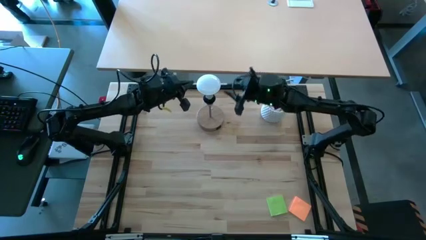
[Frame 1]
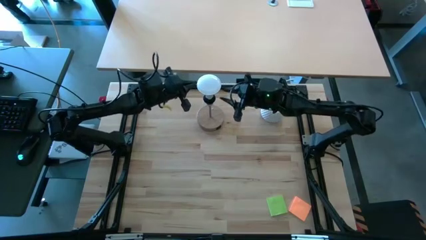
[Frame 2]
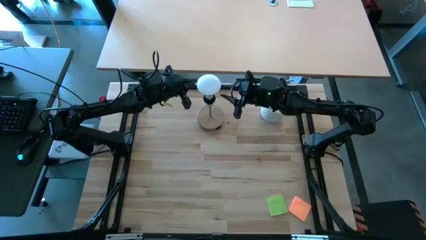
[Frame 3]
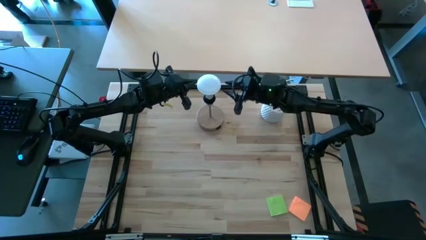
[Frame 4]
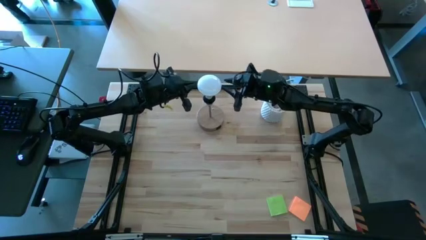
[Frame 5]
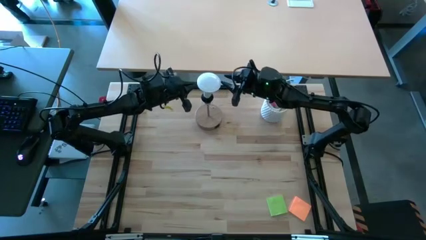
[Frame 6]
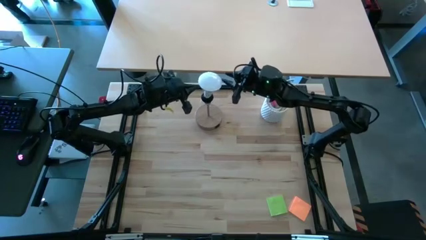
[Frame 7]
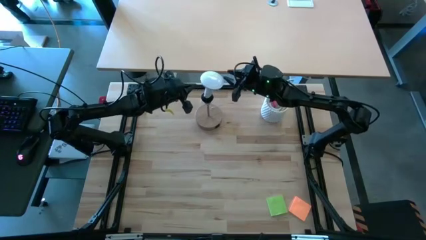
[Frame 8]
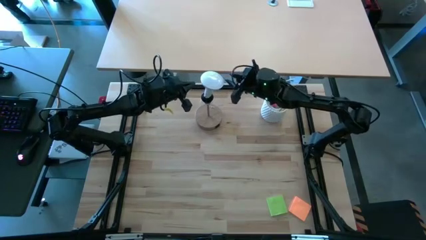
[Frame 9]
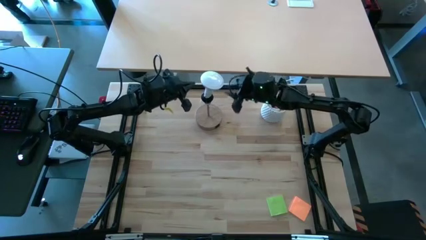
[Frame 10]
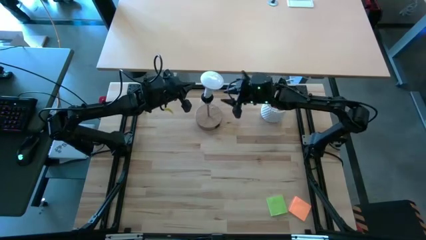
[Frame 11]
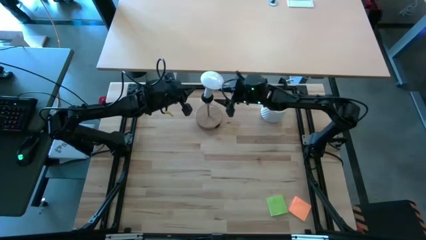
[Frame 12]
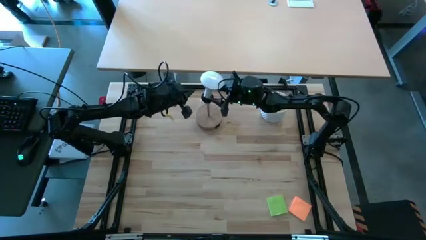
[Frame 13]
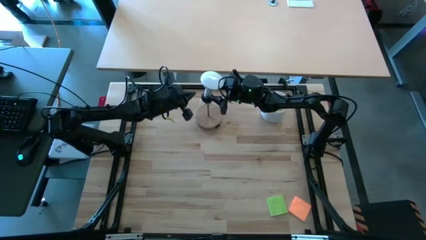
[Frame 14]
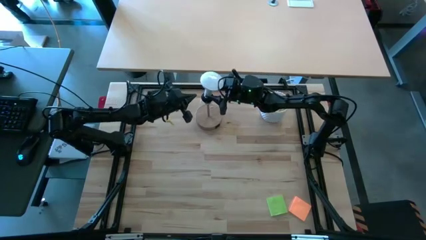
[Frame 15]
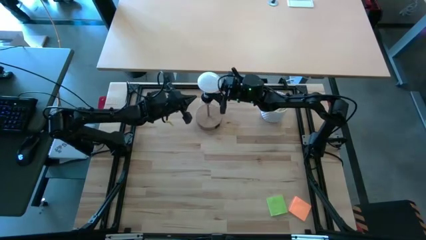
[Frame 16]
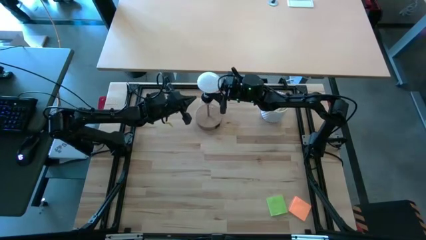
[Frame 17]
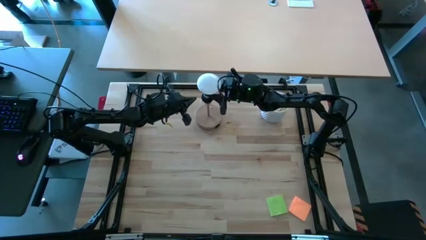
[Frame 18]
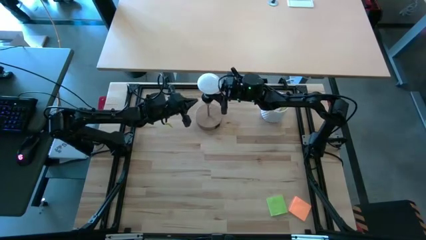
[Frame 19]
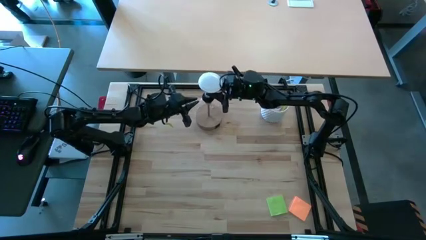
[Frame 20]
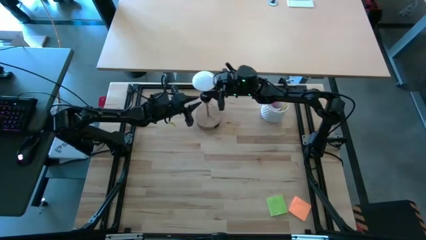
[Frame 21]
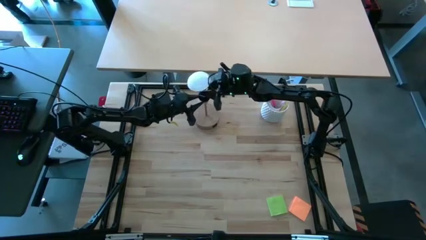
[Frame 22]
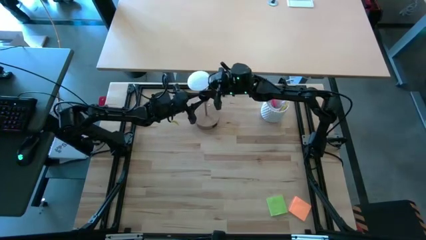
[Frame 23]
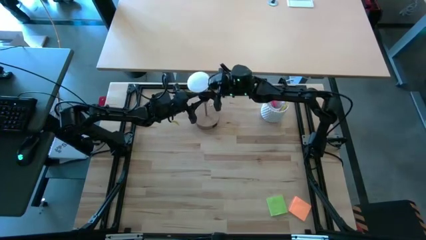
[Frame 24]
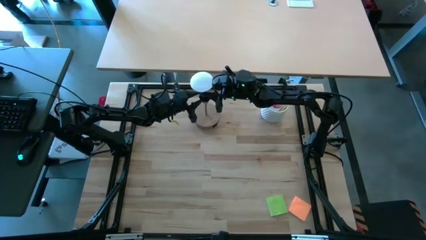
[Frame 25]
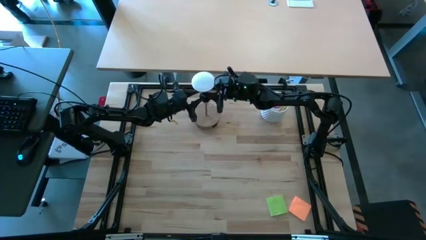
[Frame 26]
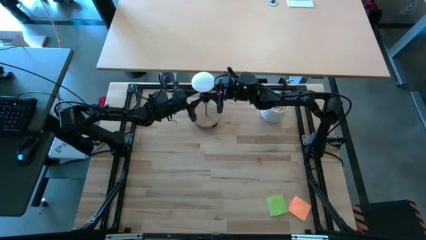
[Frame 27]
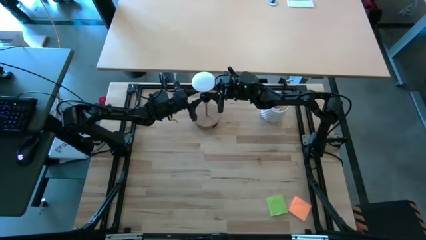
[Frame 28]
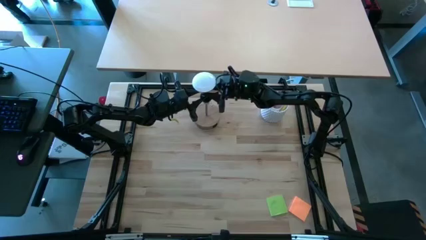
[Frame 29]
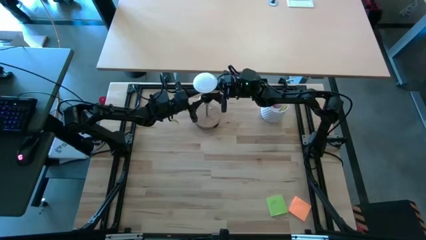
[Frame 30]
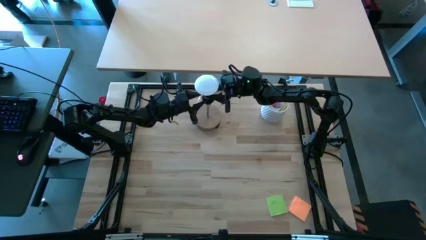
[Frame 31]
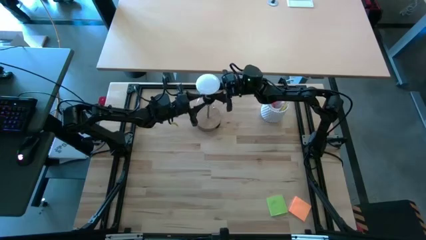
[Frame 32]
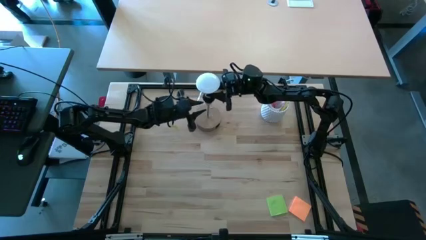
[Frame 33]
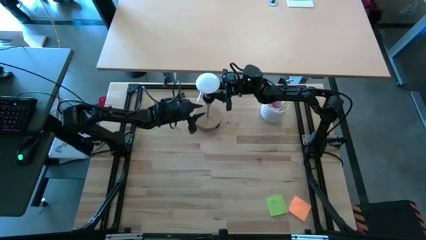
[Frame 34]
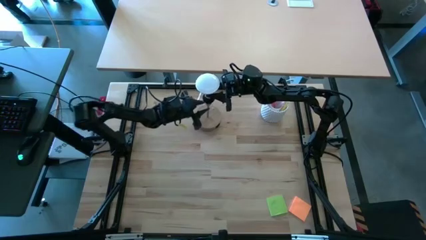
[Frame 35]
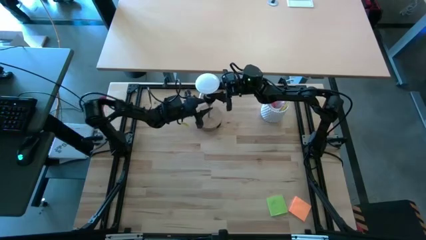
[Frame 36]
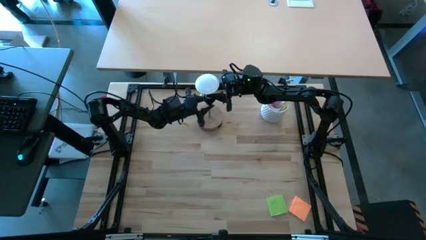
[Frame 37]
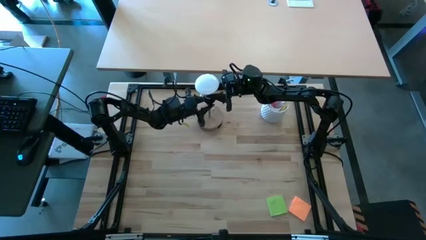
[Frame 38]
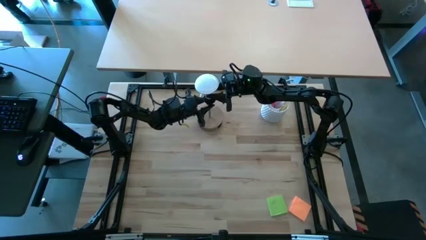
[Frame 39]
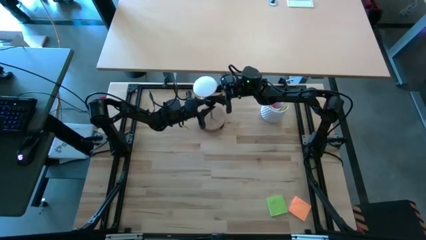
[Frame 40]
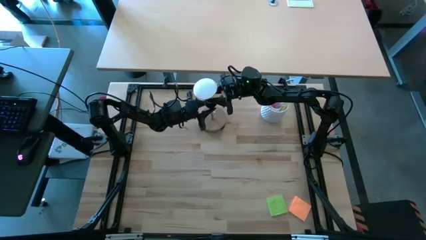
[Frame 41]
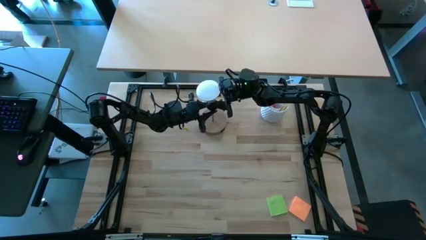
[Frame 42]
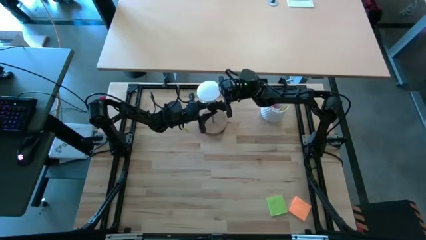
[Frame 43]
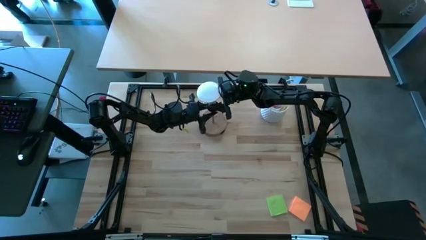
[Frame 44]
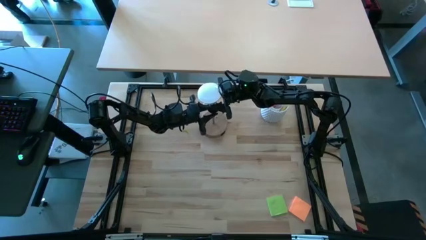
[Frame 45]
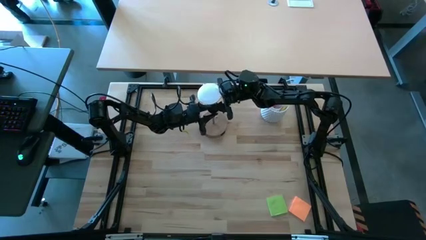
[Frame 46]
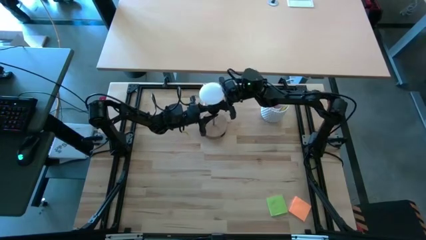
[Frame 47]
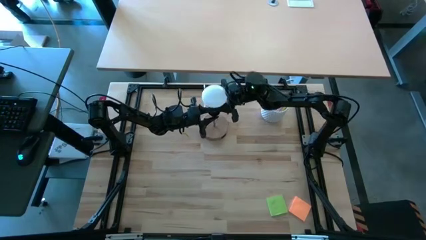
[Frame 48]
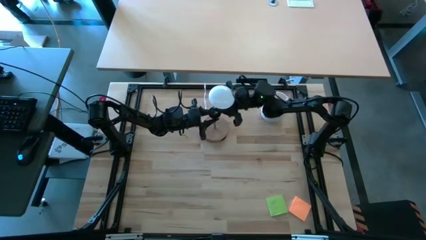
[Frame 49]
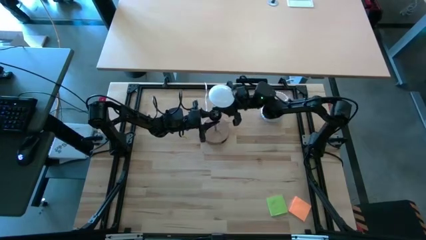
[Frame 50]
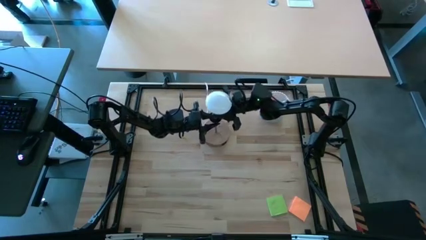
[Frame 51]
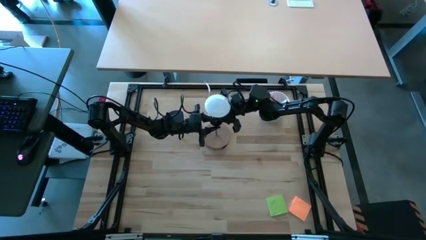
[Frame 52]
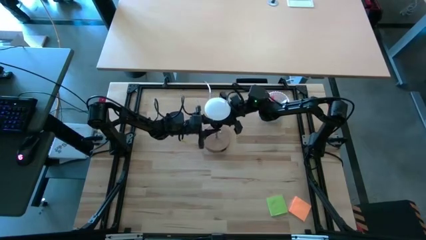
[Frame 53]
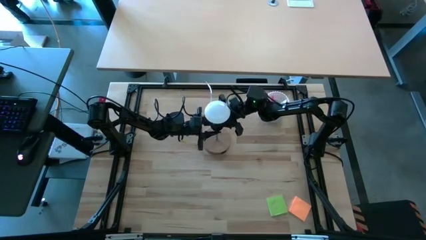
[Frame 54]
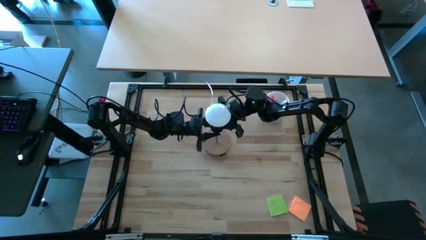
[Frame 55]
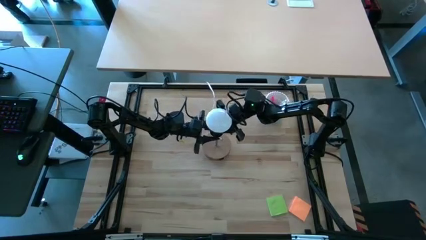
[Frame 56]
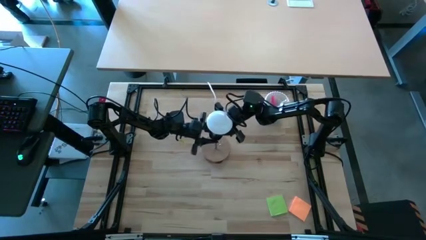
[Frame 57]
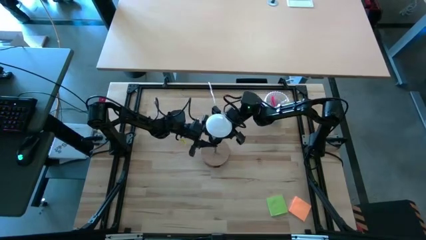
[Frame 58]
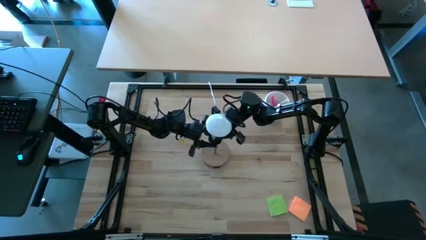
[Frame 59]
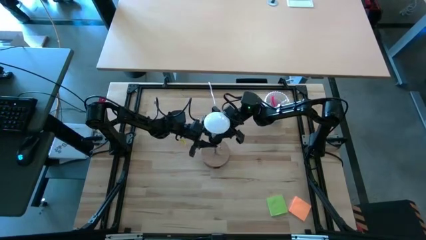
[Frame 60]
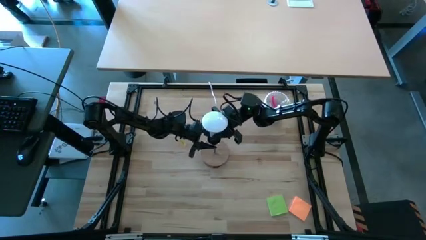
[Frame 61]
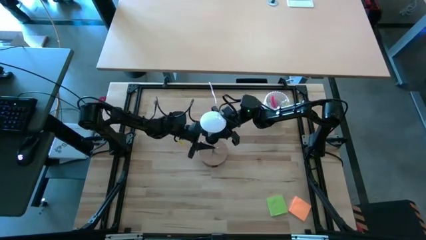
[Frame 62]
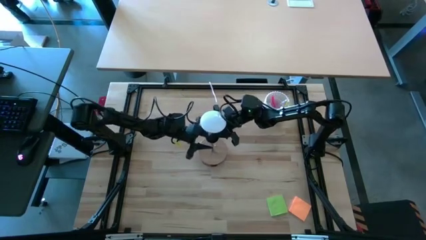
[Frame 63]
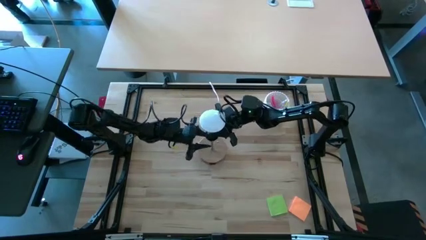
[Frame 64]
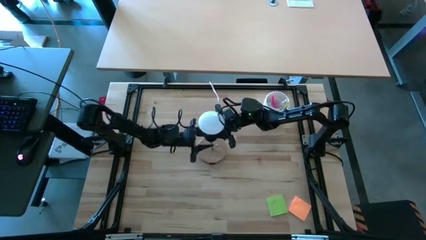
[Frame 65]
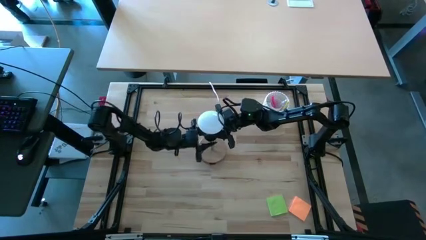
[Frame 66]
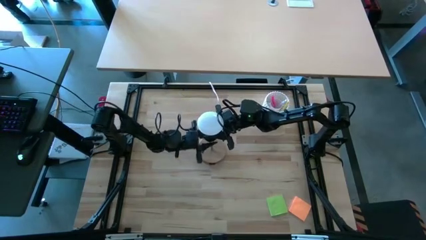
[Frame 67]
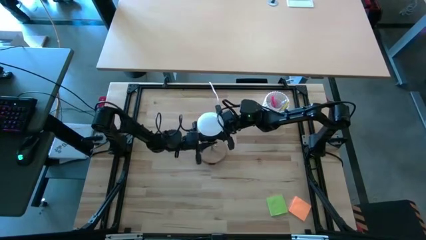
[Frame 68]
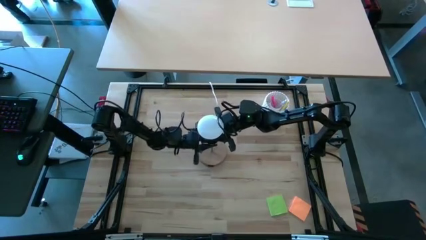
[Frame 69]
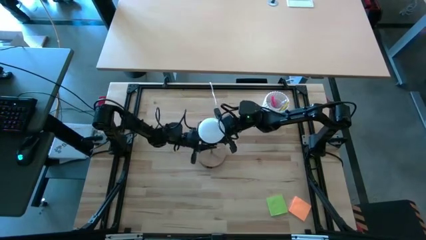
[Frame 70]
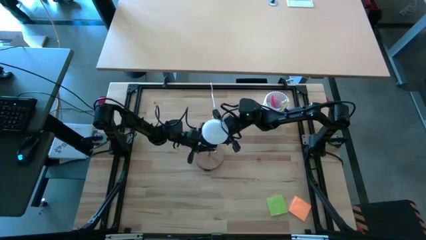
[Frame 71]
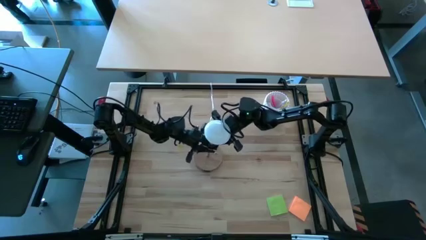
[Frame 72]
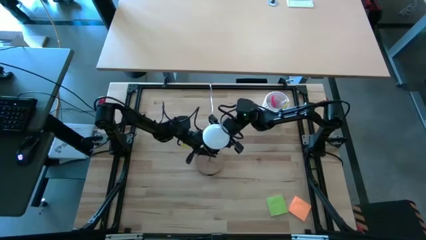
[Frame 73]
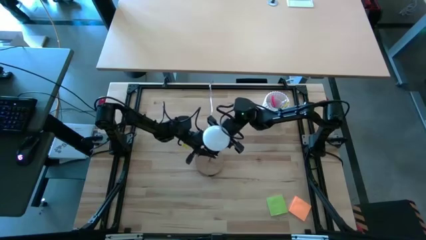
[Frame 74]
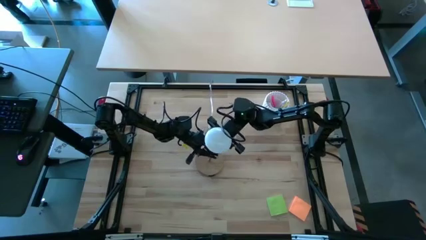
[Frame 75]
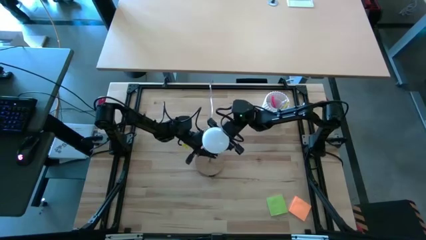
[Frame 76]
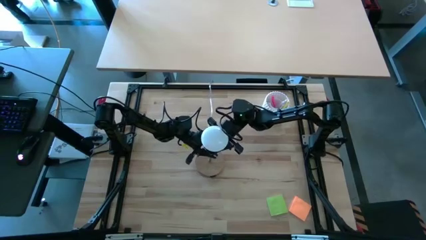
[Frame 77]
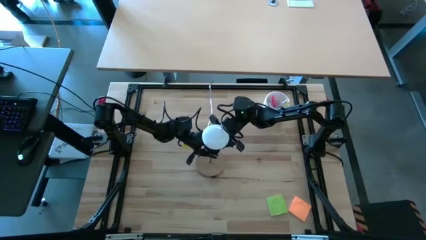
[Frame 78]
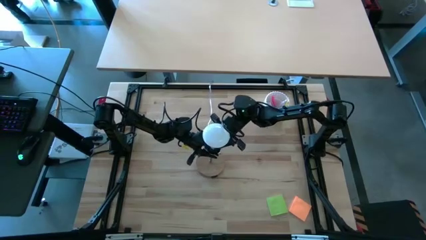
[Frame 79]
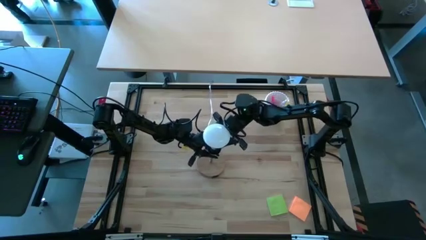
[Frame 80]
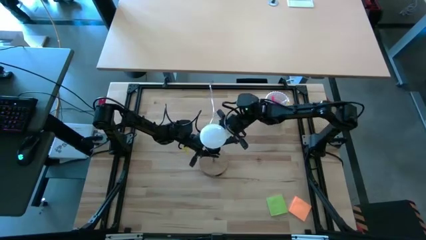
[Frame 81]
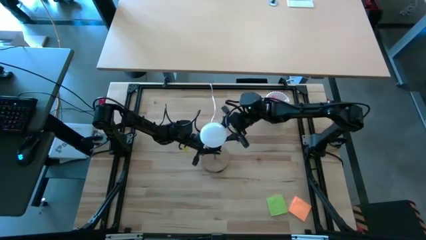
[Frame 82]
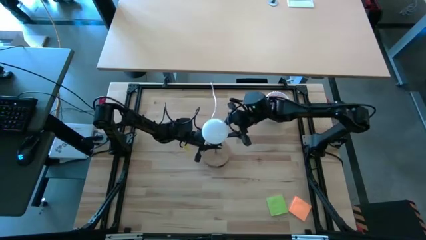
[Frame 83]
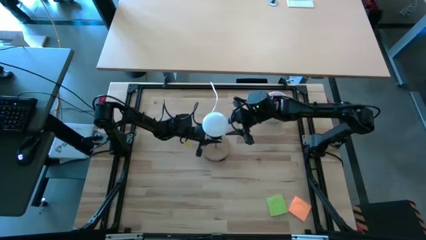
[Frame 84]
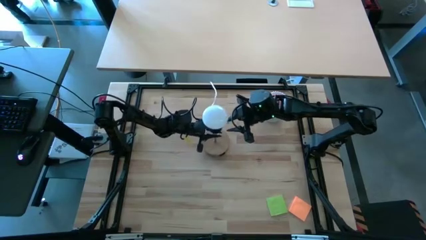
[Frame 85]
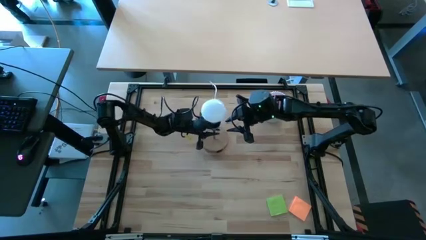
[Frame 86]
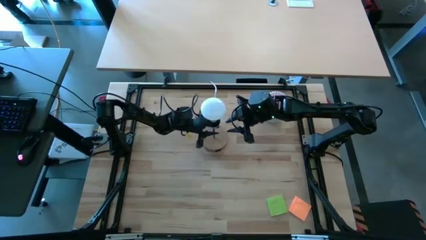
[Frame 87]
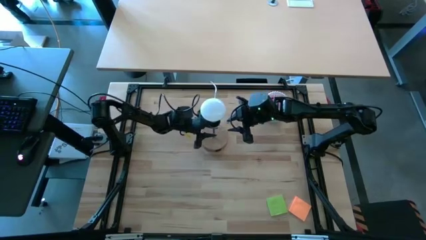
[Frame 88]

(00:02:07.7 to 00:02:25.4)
Task: Screw lightbulb
Insert the lightbulb into the lamp
